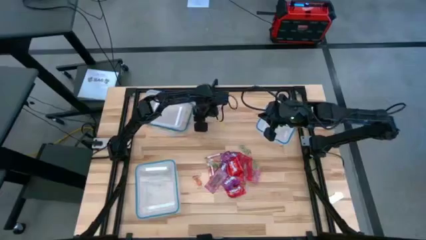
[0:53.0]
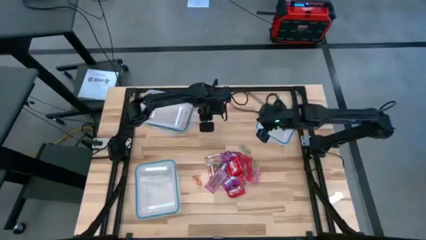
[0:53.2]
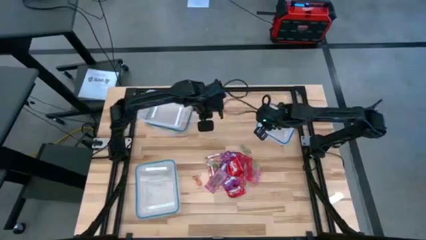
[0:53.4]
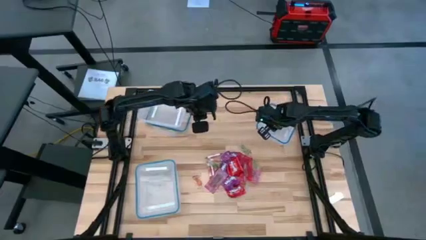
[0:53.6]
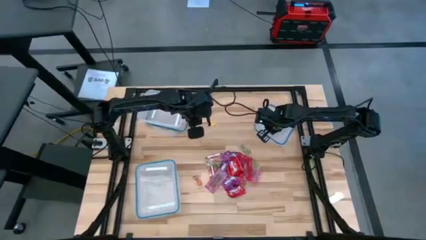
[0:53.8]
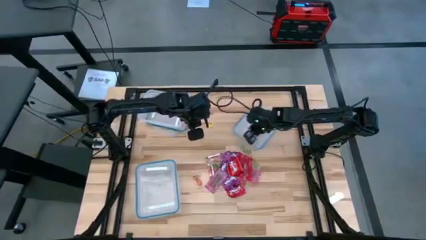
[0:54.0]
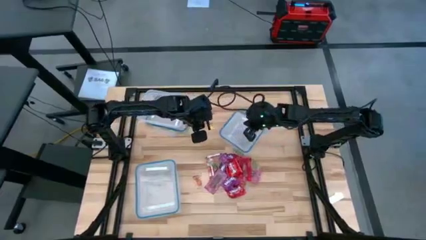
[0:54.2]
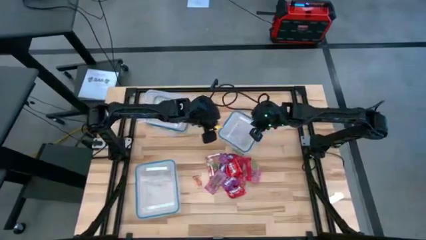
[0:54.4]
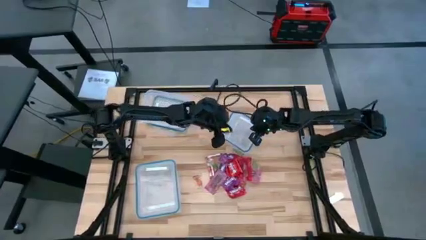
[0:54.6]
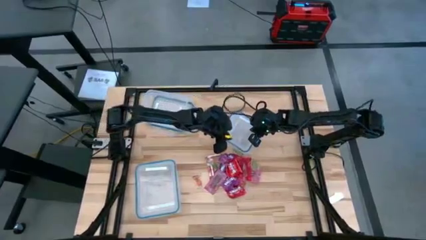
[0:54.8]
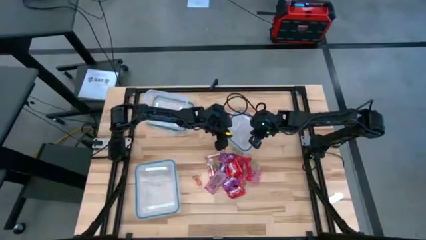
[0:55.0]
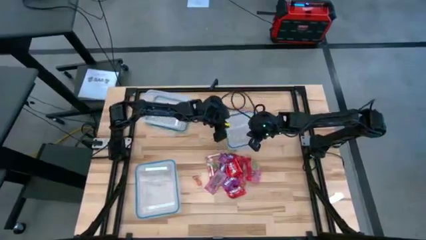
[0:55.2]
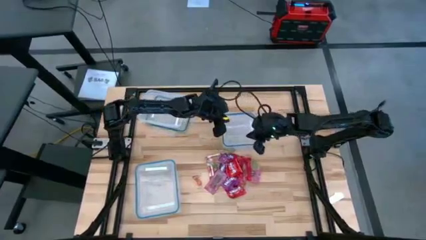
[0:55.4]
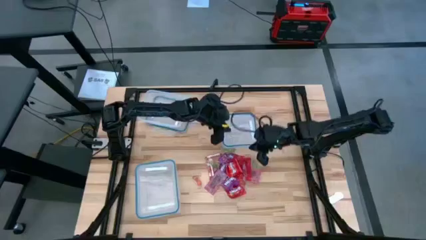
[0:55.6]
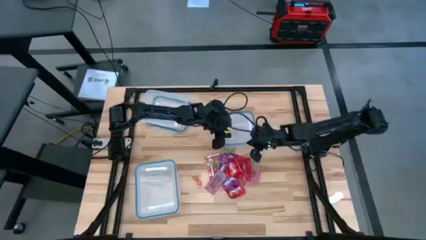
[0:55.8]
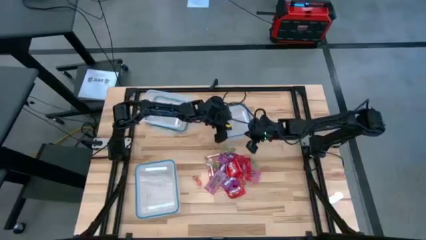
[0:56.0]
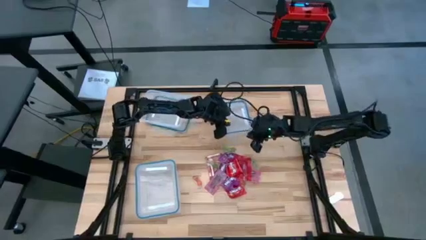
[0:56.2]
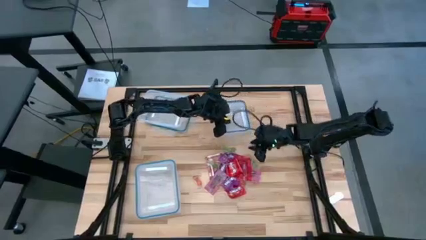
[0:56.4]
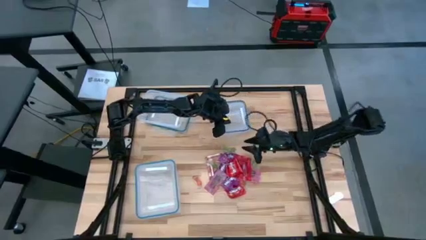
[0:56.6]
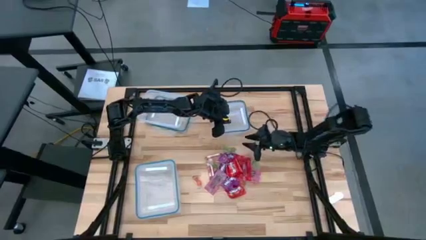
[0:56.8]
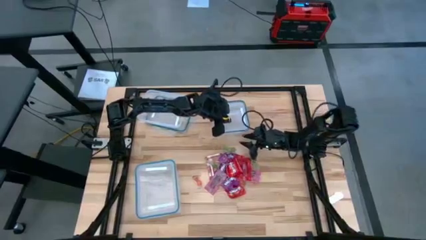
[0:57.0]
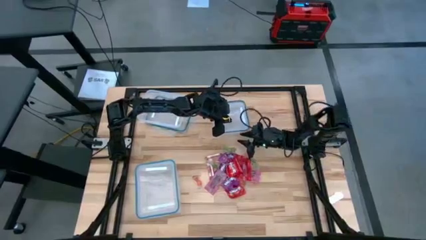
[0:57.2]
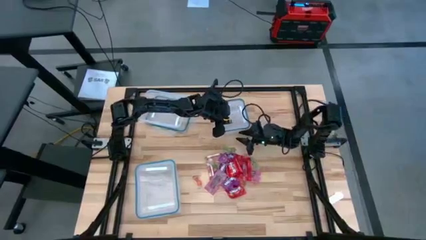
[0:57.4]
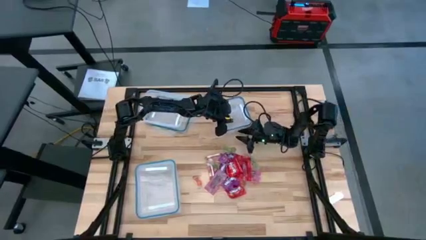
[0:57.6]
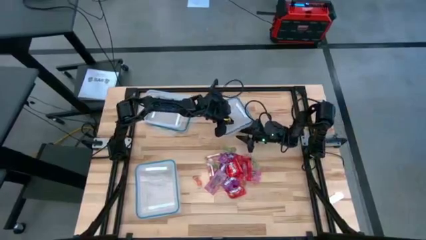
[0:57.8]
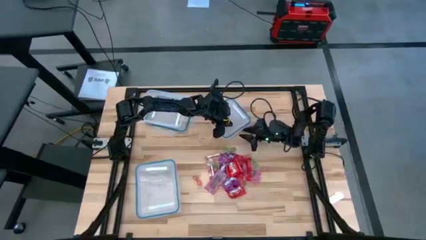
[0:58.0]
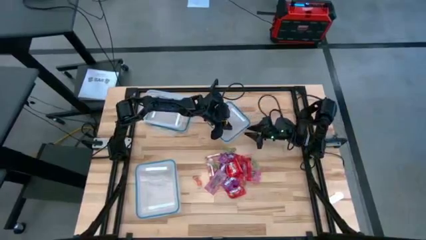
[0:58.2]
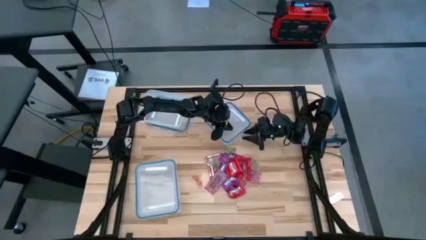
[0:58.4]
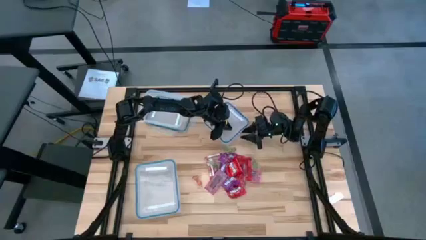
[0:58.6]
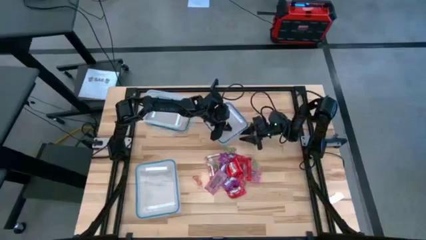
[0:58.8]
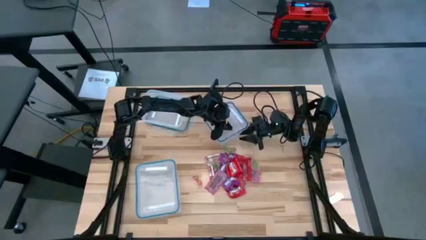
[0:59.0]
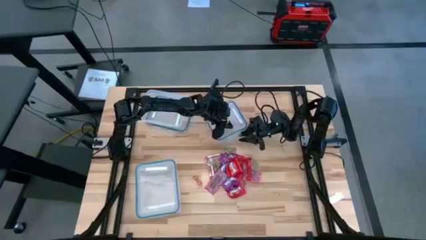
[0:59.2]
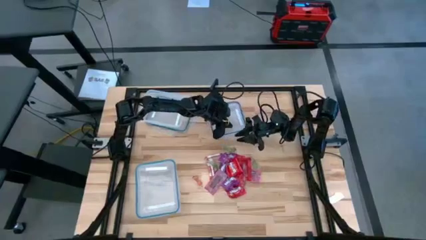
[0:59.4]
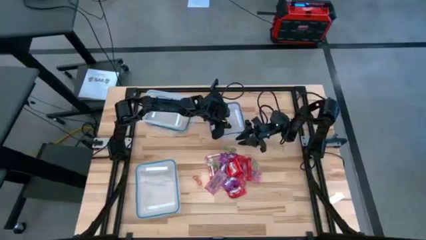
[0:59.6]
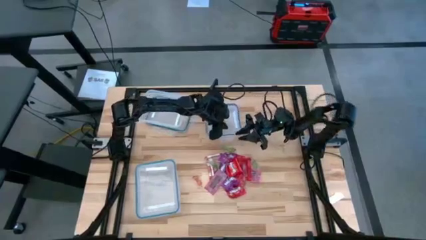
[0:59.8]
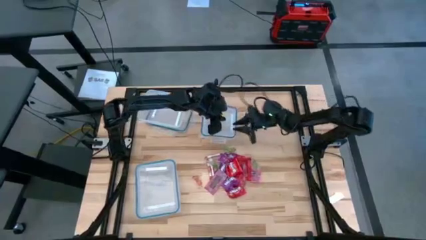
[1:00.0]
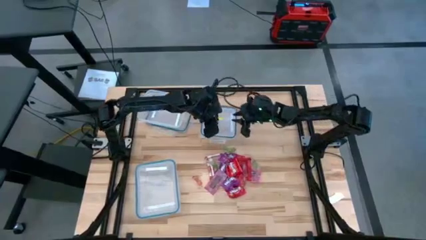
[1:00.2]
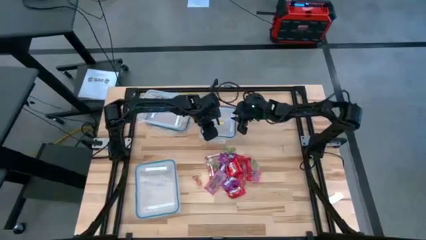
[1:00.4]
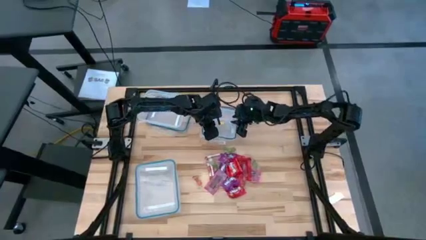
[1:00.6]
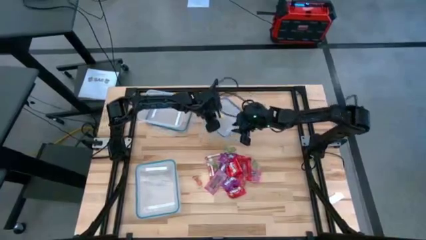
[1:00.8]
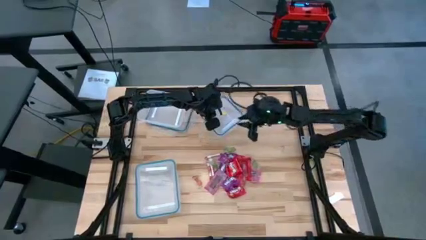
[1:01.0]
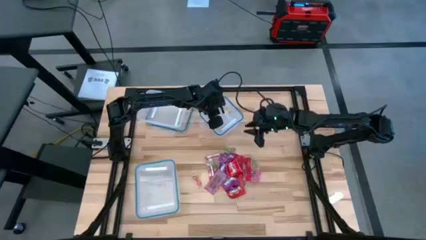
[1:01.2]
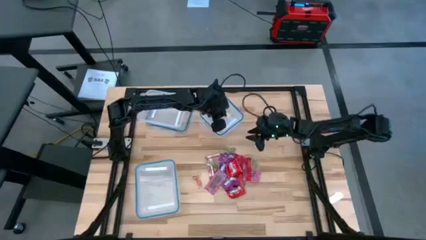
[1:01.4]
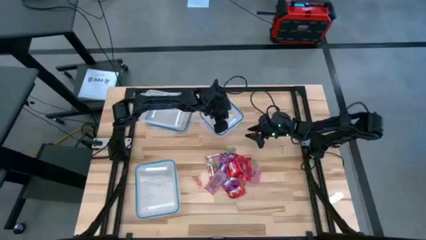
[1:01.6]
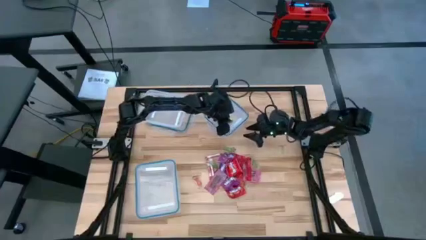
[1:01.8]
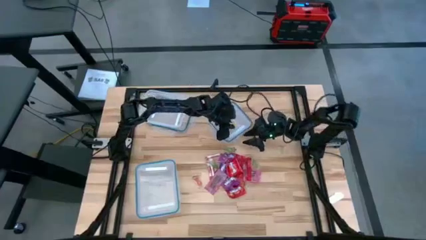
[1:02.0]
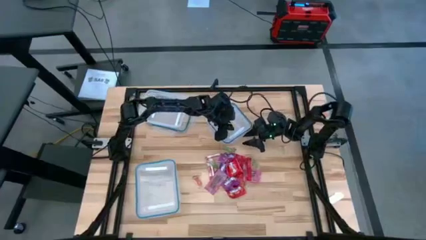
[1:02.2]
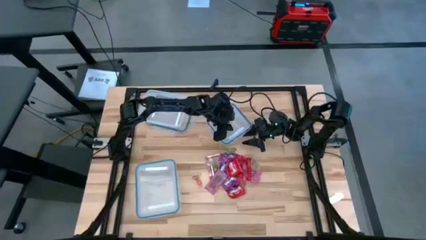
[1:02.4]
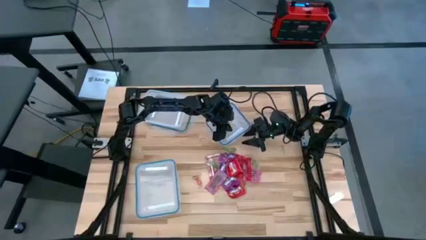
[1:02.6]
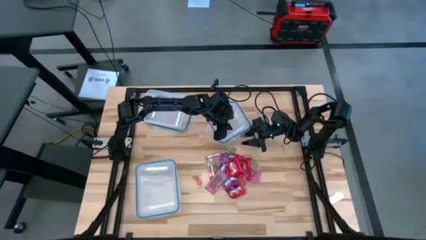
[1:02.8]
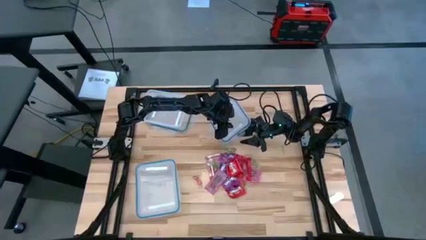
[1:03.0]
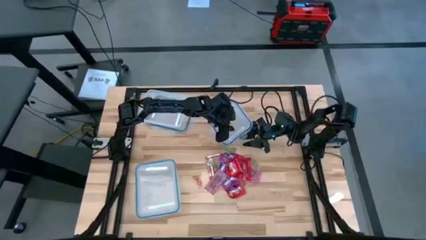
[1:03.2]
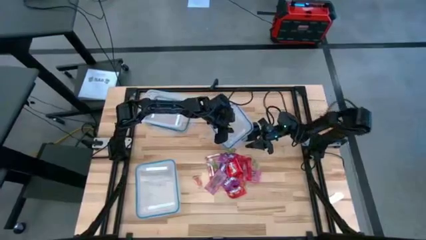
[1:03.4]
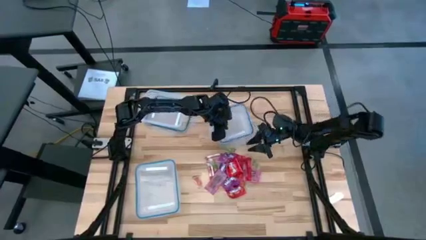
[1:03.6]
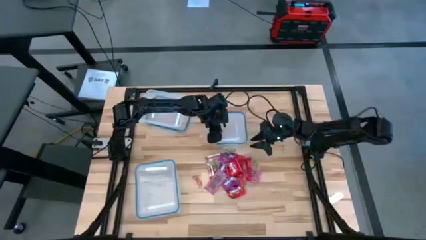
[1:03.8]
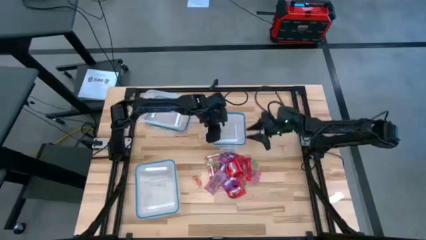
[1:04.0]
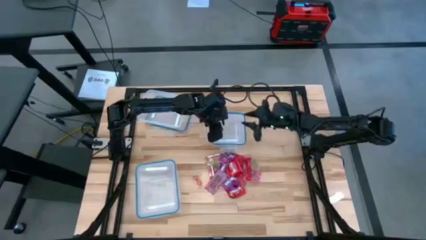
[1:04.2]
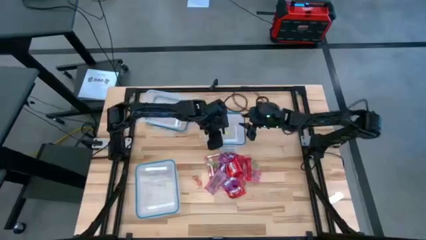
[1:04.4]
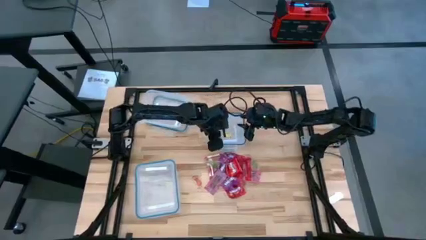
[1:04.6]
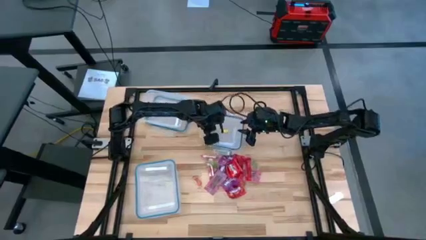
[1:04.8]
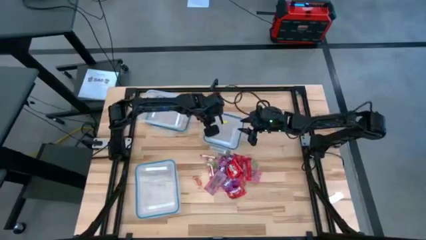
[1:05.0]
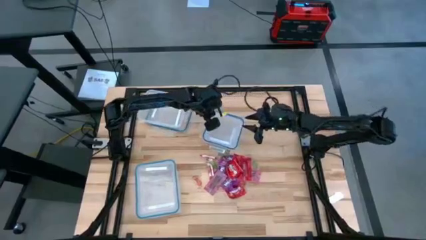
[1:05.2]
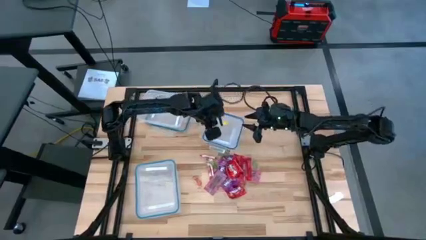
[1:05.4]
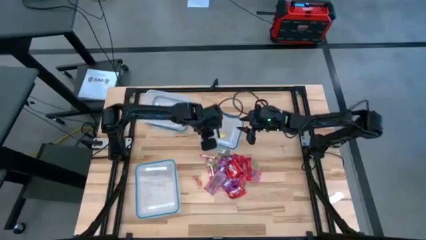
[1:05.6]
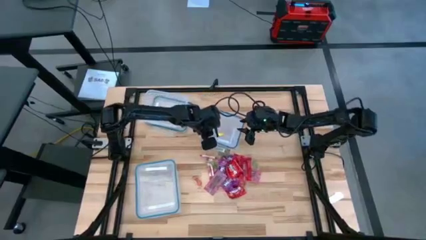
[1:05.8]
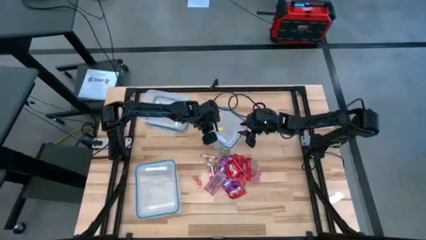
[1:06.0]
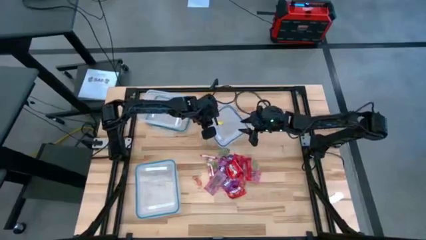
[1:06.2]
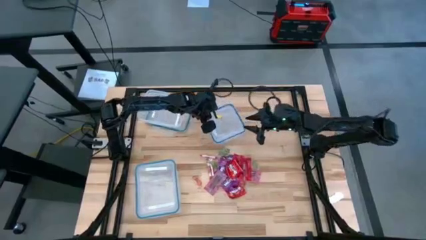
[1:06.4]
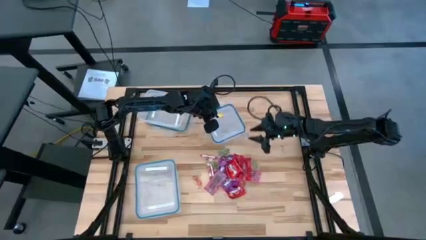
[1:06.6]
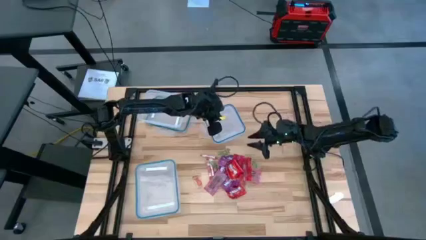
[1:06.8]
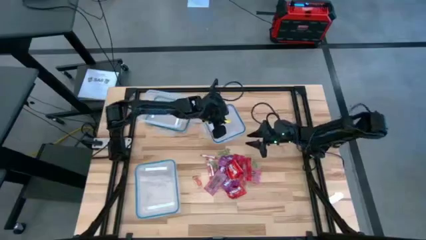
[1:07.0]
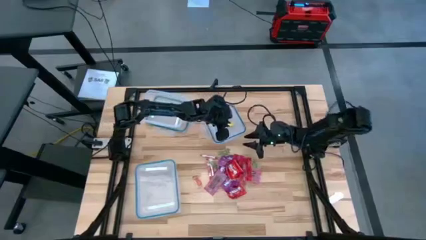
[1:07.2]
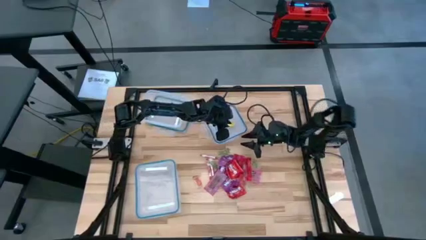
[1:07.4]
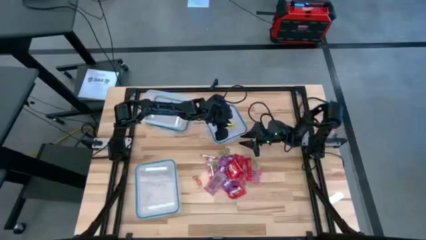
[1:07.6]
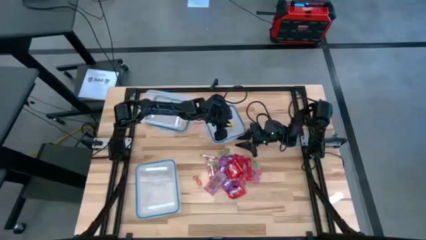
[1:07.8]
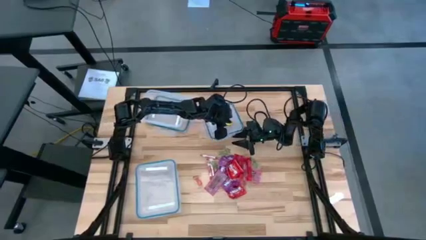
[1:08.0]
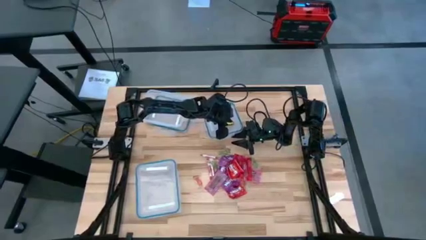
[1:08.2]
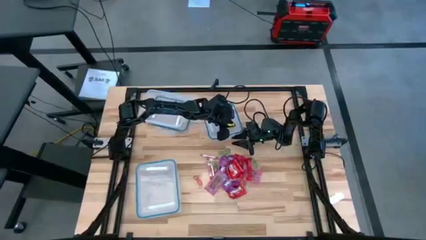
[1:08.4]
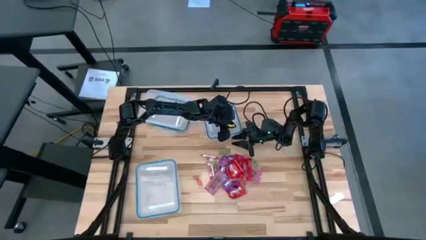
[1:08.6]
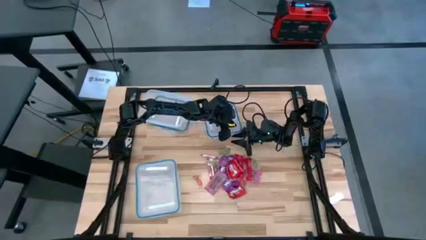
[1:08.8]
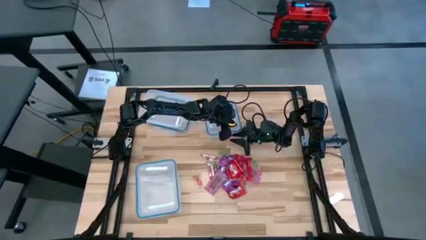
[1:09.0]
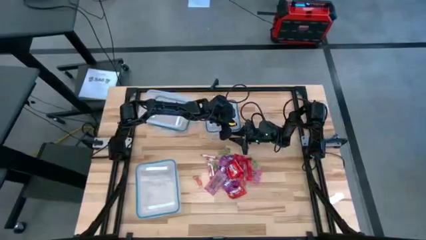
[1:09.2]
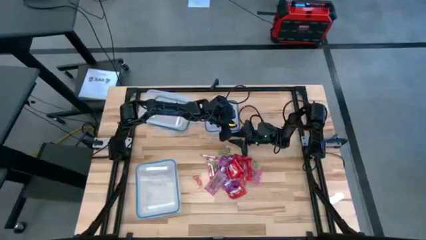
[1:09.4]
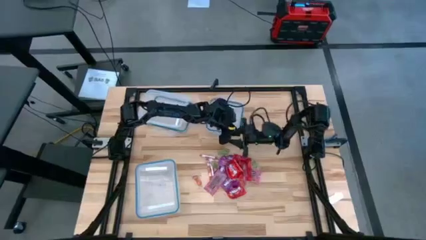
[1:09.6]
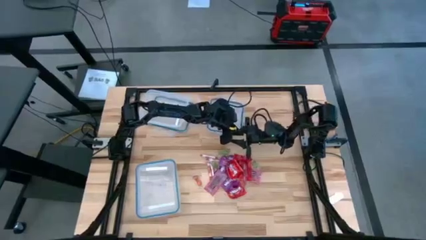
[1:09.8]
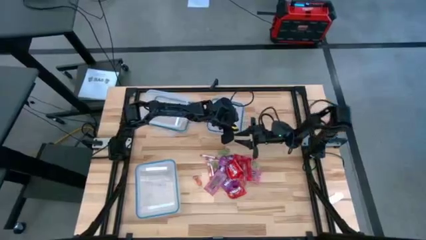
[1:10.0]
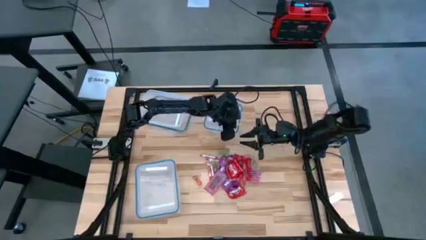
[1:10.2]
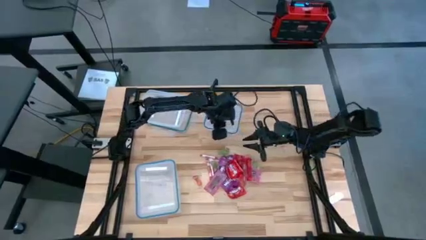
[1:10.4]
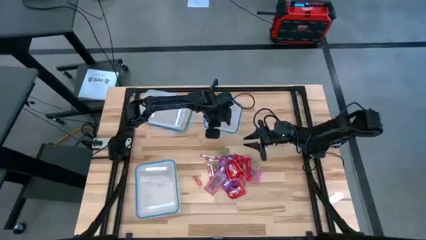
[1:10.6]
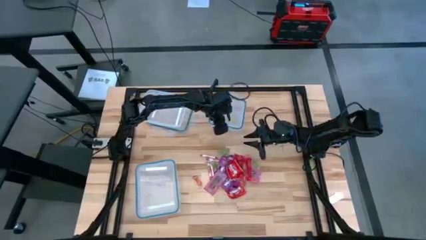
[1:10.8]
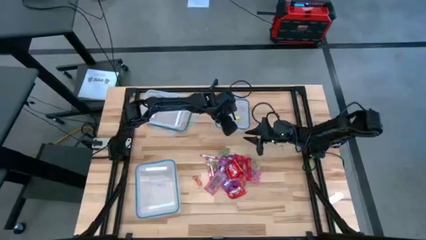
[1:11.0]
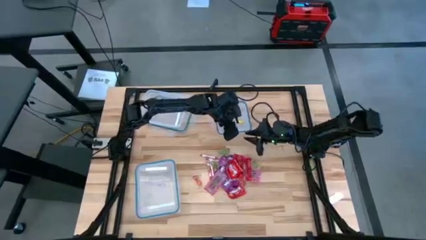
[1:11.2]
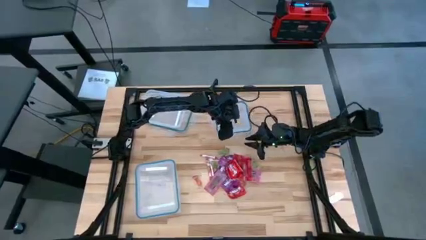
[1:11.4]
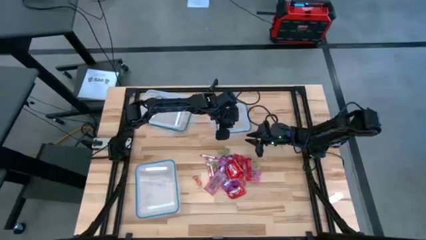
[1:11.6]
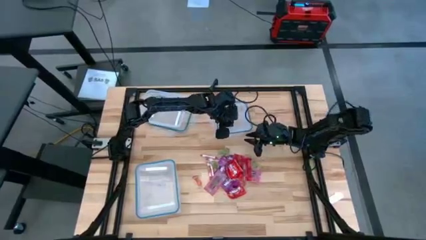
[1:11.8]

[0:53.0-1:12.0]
Task: Sort candy
Open the top right transparent bin
